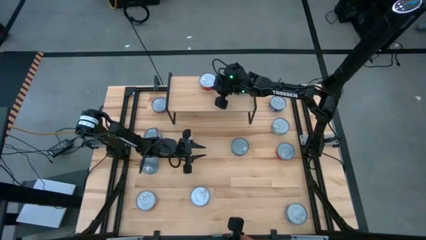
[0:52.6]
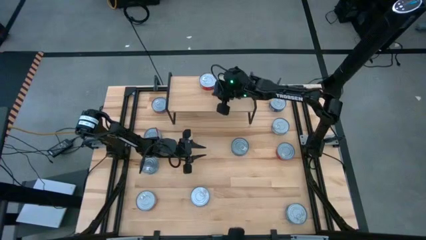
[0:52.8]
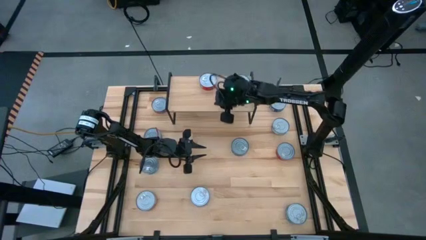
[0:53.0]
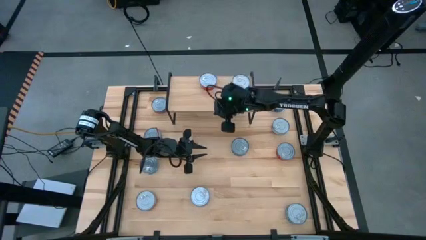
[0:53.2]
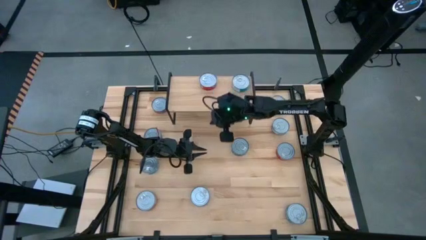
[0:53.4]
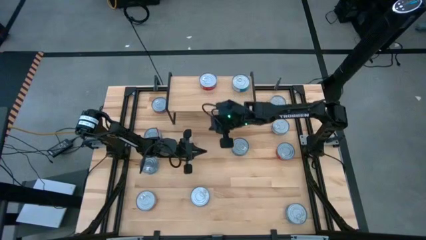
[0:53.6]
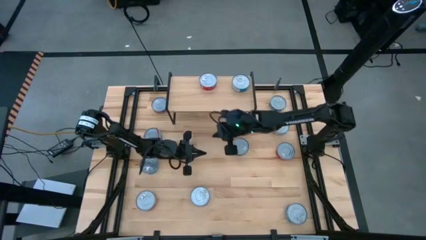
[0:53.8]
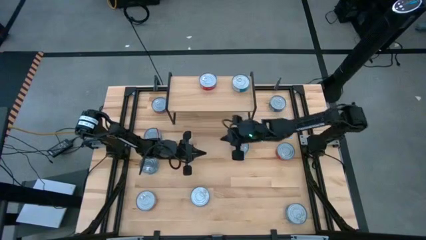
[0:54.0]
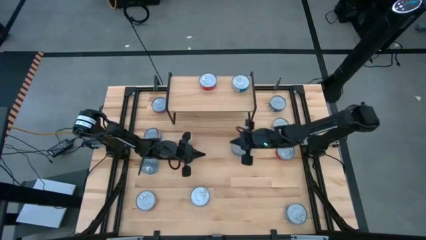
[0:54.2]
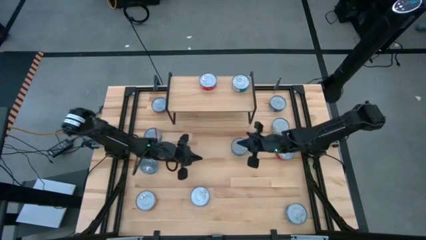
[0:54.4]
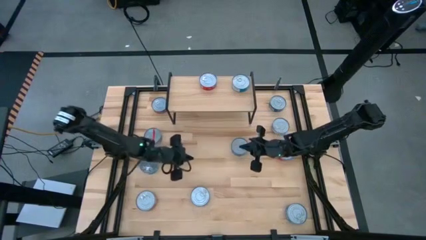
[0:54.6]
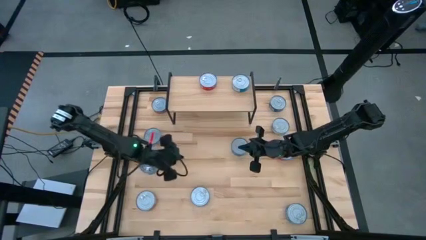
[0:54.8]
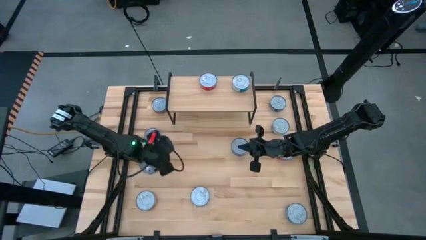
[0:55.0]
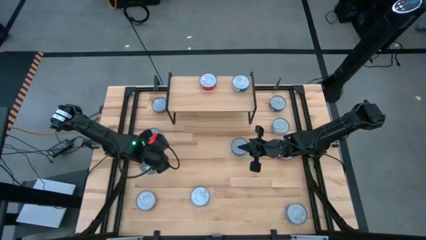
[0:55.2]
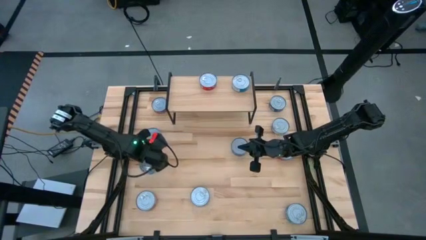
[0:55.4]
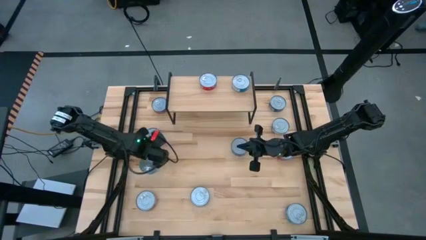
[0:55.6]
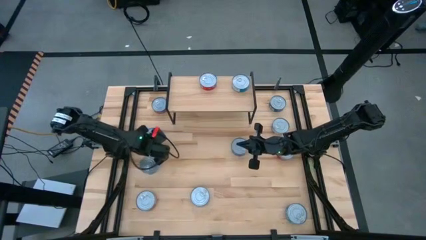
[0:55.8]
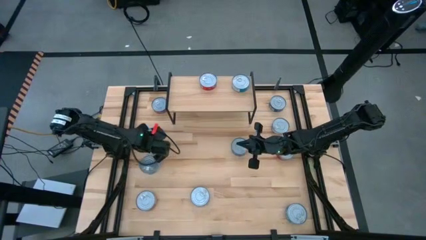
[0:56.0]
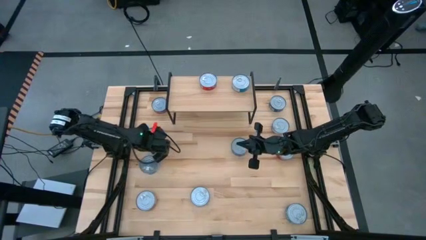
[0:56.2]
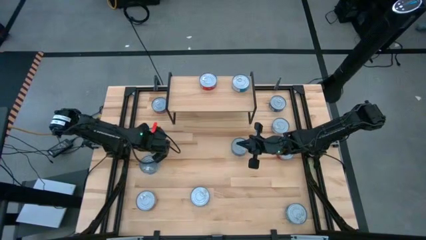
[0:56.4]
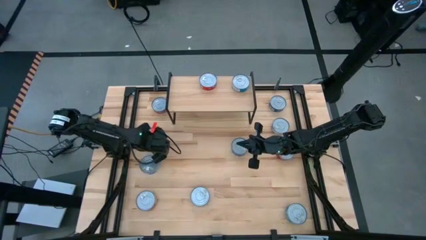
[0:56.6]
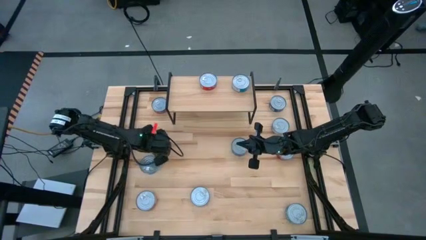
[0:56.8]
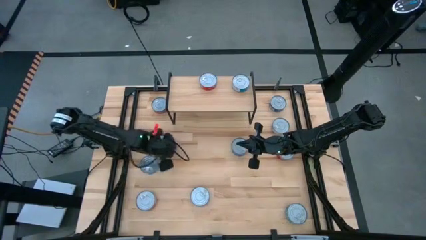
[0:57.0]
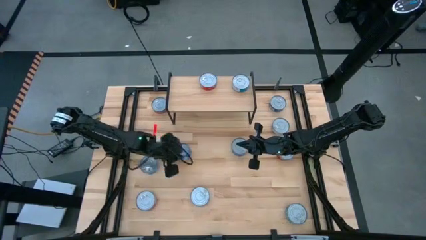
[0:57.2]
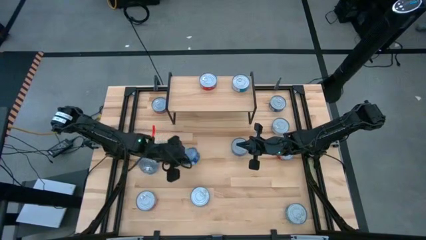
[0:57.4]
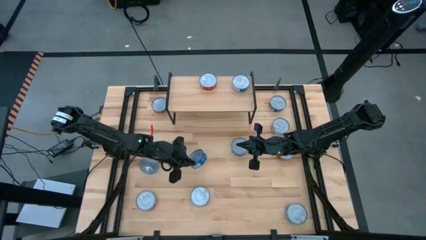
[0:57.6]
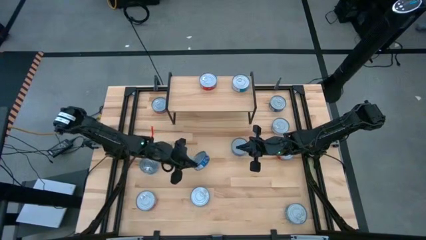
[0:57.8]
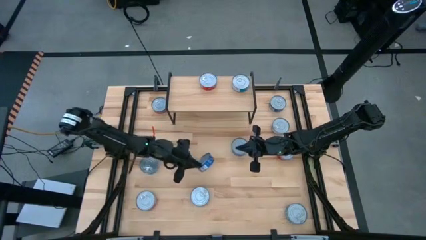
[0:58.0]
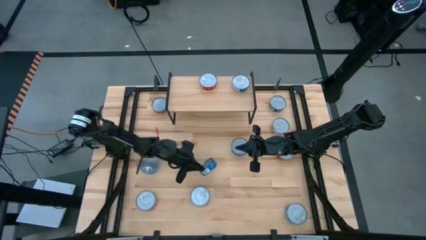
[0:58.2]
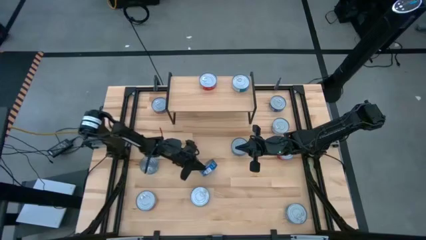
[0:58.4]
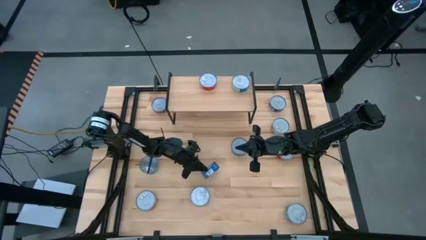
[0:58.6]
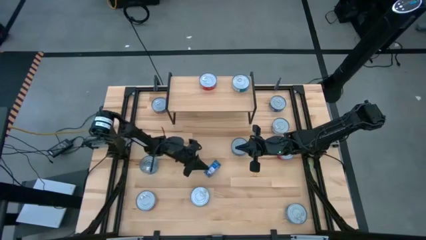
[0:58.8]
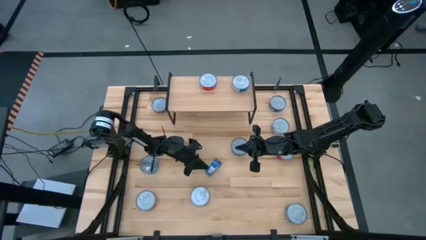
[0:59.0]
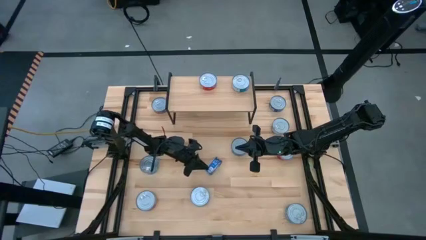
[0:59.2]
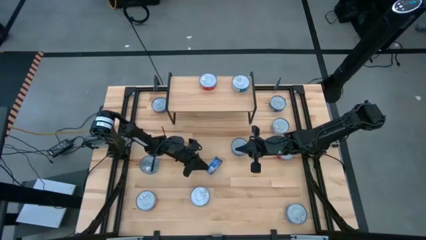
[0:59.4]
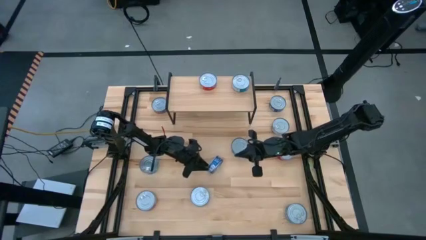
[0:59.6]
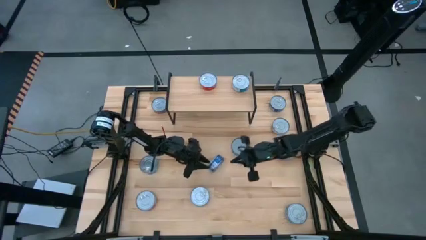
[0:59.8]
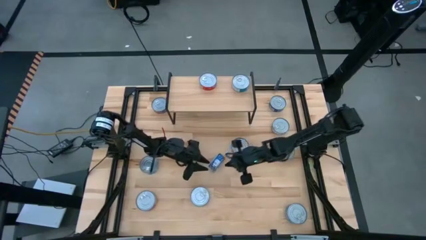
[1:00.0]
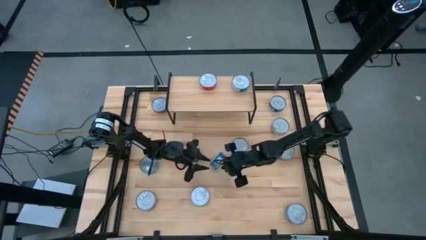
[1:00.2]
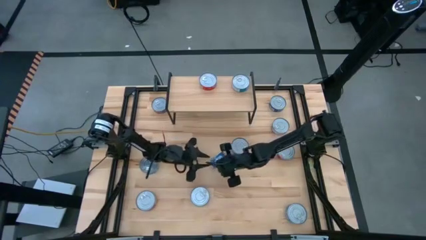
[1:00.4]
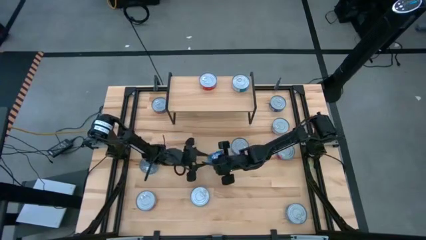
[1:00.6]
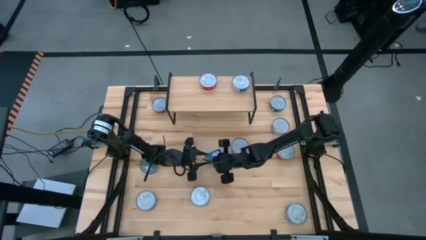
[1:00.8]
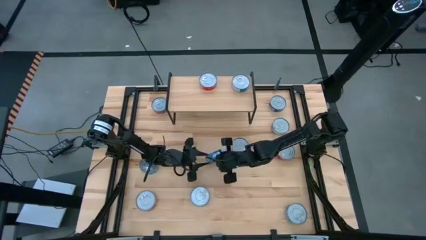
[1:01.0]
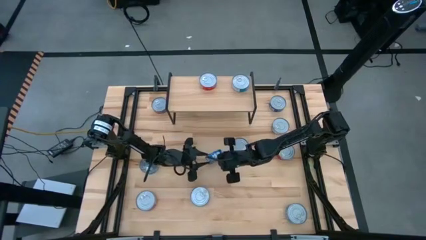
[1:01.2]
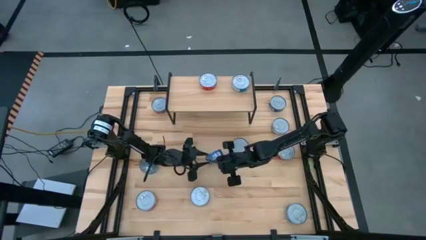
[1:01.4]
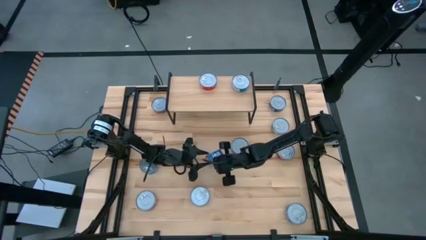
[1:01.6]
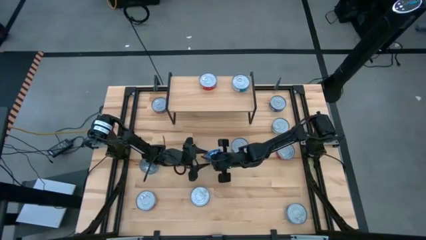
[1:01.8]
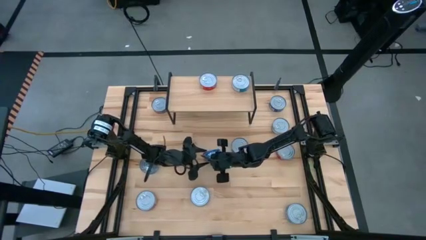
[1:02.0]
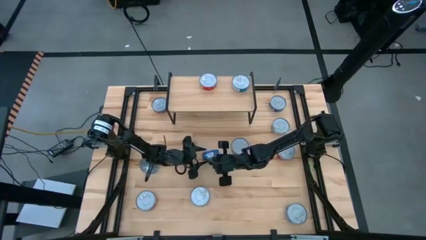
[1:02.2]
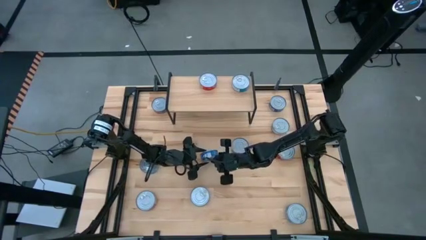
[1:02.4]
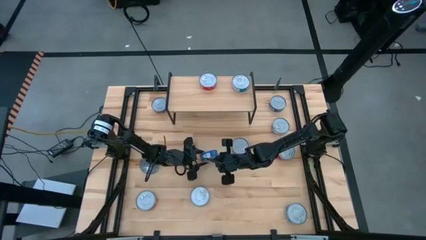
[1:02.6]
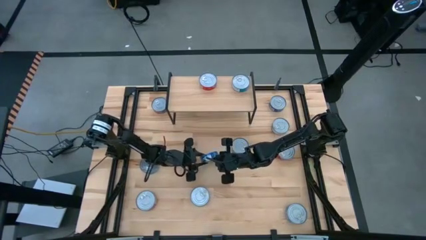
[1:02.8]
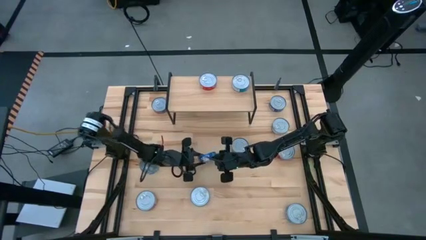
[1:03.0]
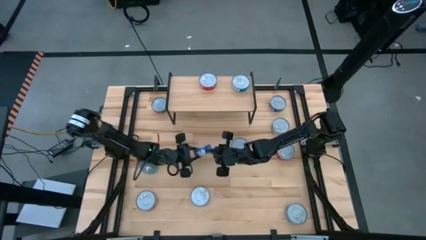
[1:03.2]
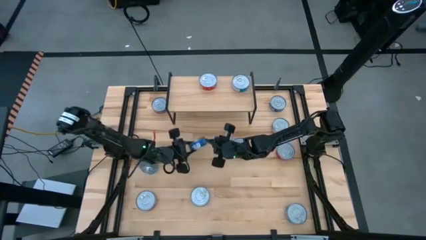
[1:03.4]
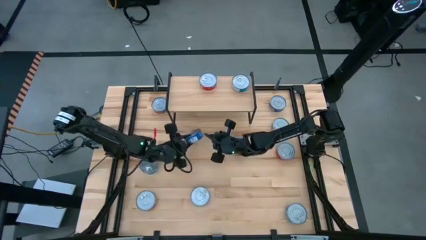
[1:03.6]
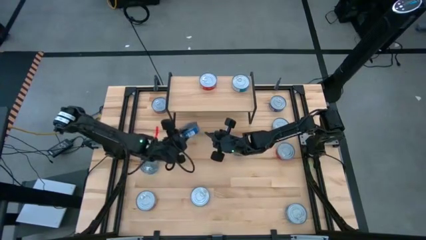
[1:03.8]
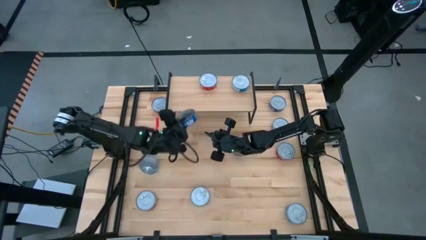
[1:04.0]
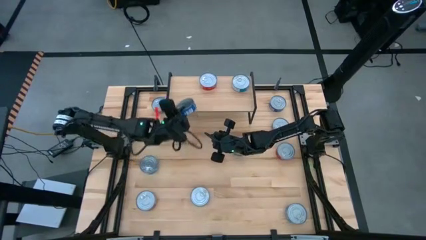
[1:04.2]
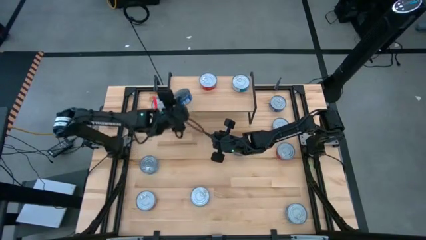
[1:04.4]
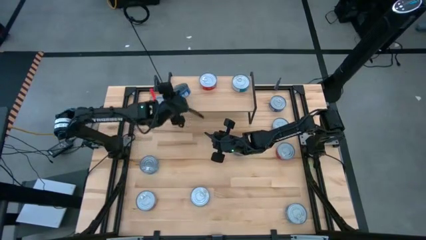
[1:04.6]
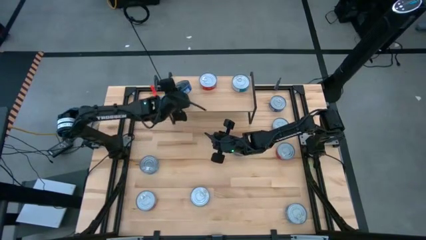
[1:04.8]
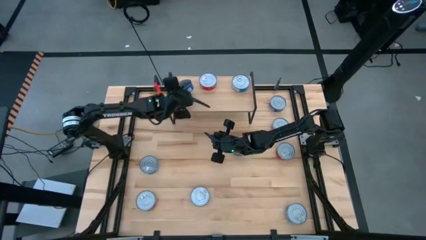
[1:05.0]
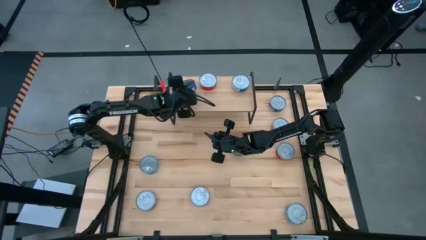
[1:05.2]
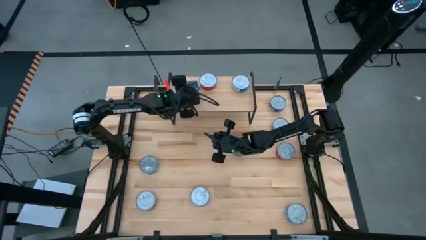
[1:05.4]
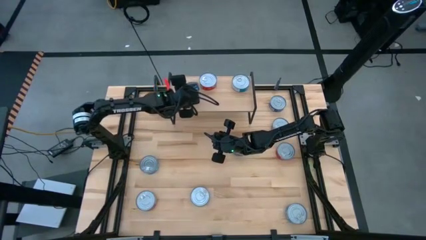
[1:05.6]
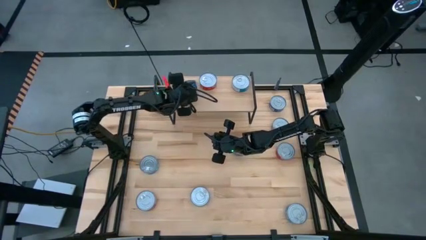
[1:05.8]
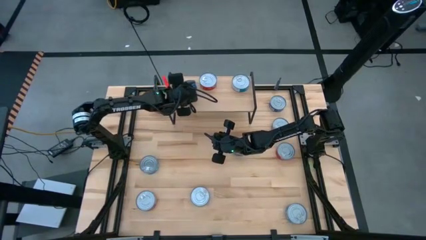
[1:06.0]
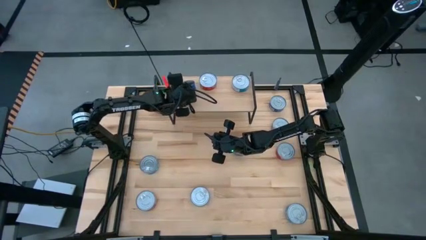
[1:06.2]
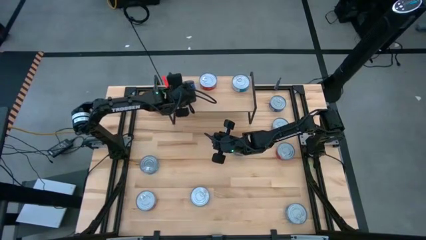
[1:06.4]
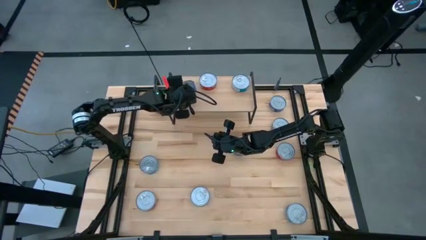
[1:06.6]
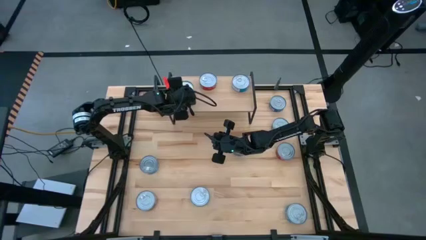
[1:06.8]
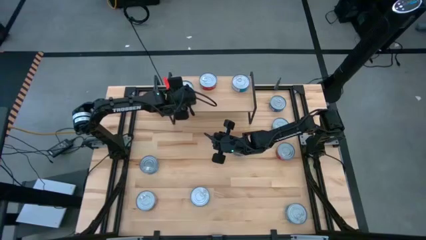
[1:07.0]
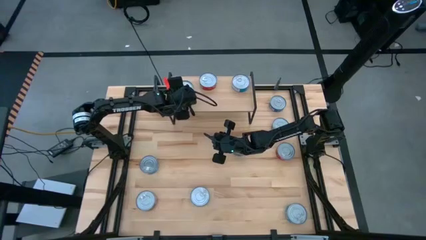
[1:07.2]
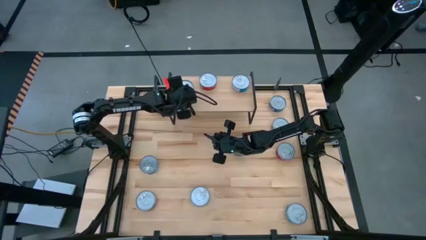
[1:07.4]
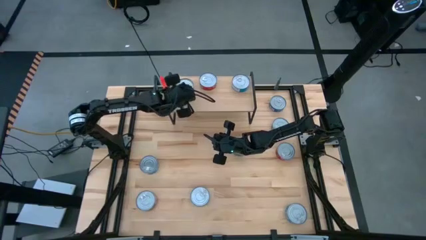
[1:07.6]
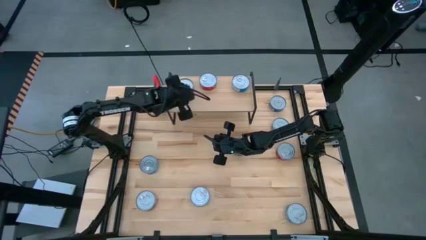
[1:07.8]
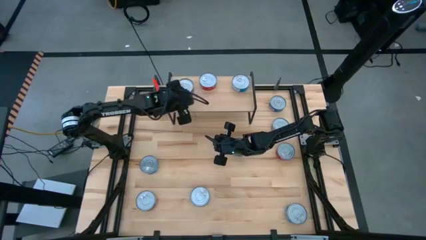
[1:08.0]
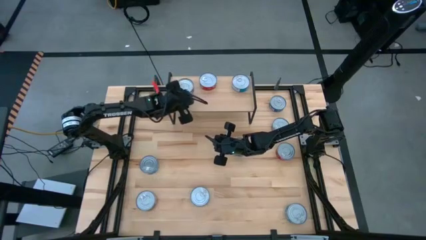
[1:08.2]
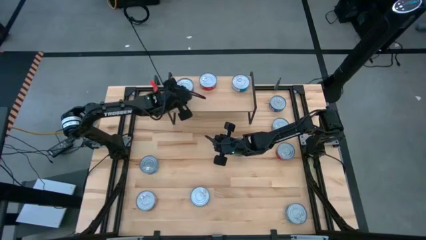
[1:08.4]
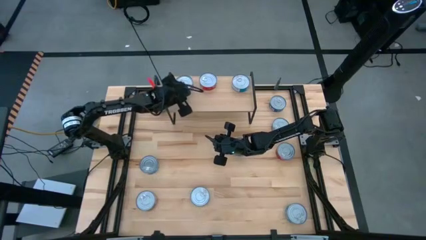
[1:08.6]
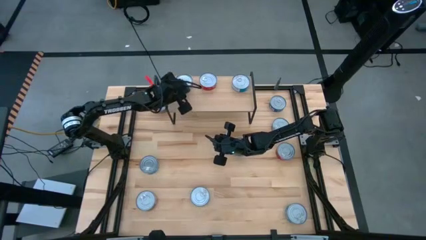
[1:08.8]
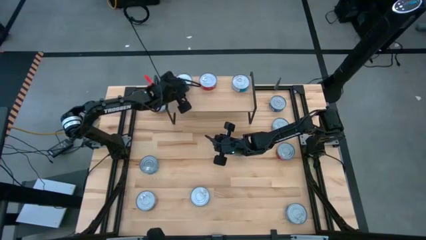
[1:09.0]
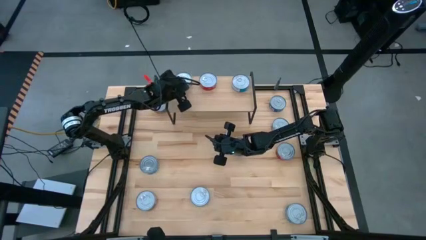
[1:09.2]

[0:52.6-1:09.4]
Task: Stack canned seafood by type on shelf
Put the blue tuna can on the shelf
